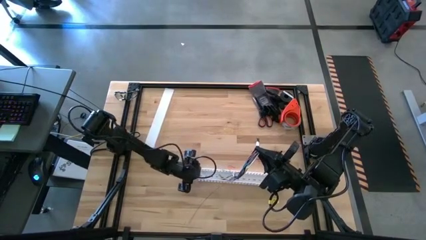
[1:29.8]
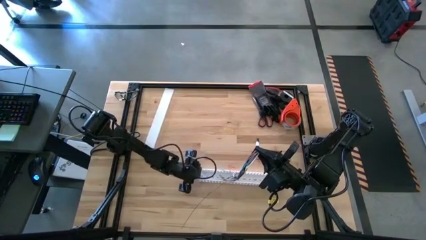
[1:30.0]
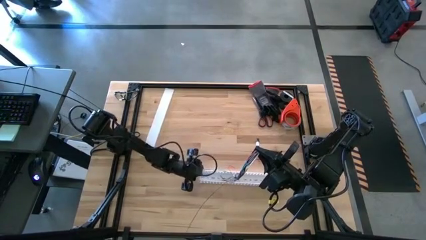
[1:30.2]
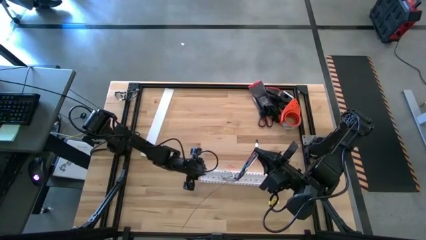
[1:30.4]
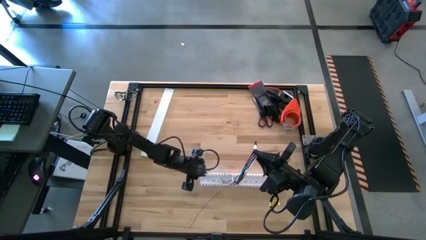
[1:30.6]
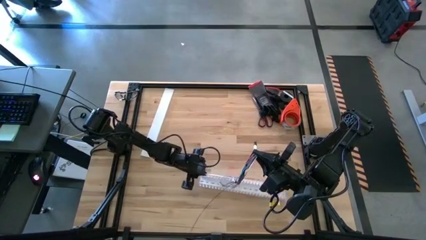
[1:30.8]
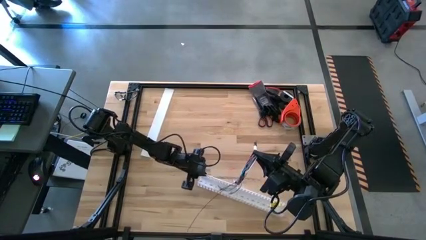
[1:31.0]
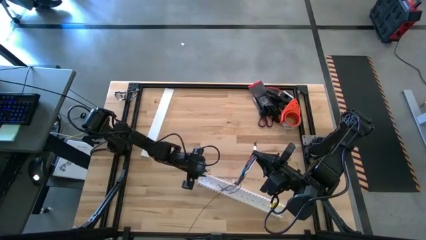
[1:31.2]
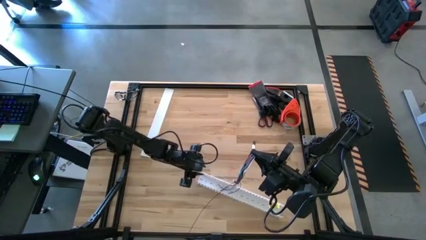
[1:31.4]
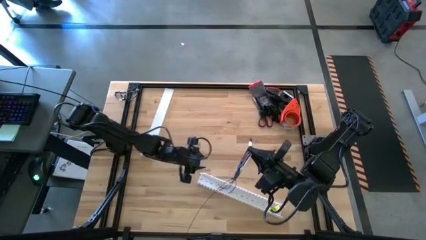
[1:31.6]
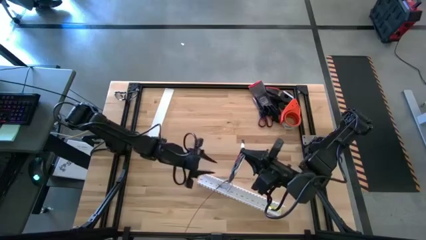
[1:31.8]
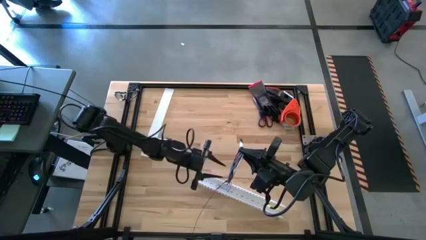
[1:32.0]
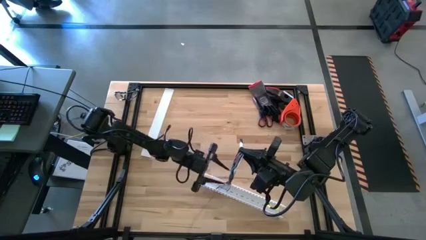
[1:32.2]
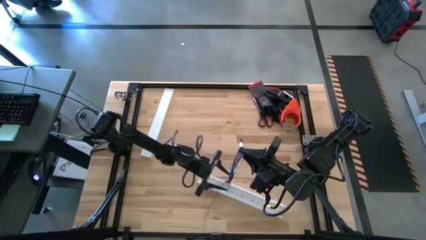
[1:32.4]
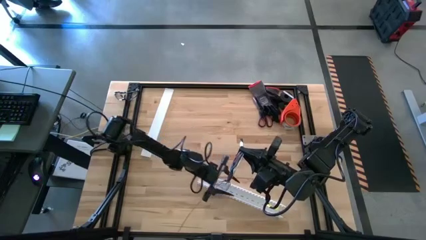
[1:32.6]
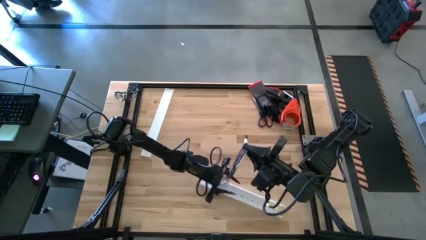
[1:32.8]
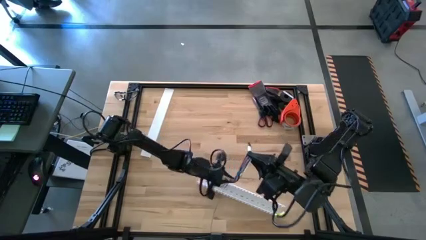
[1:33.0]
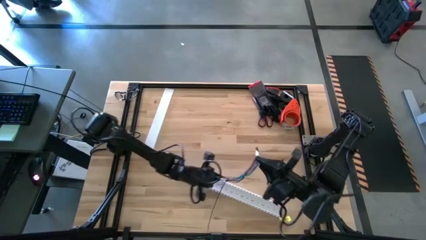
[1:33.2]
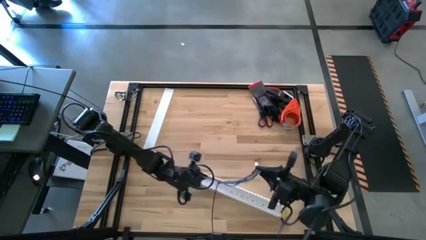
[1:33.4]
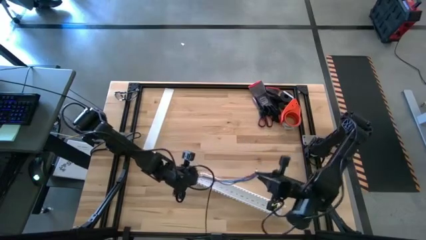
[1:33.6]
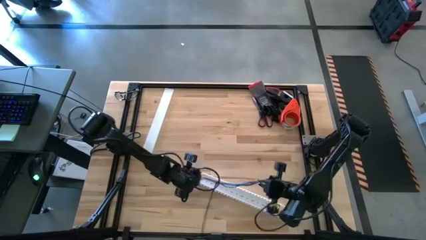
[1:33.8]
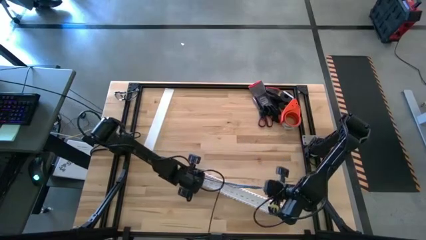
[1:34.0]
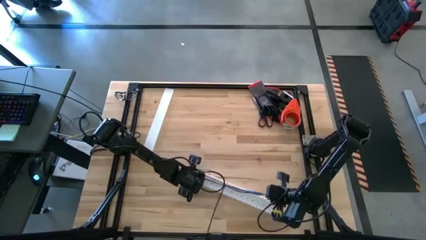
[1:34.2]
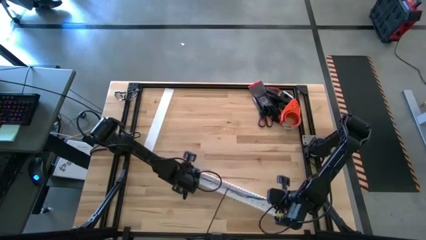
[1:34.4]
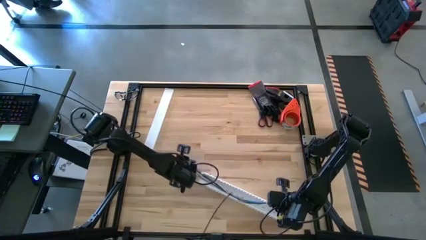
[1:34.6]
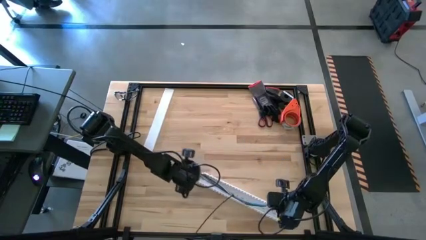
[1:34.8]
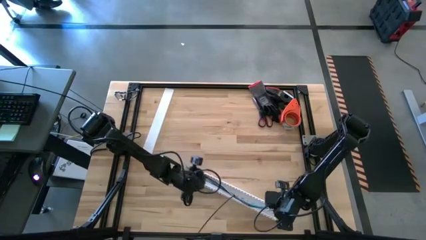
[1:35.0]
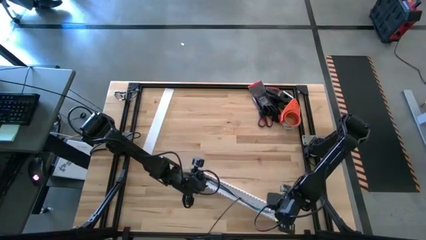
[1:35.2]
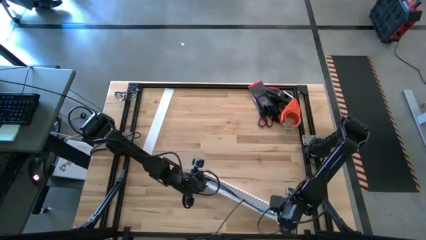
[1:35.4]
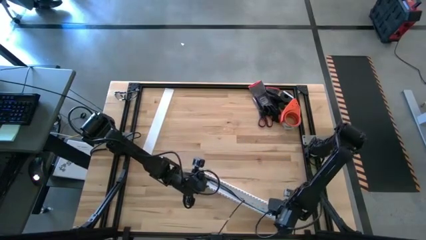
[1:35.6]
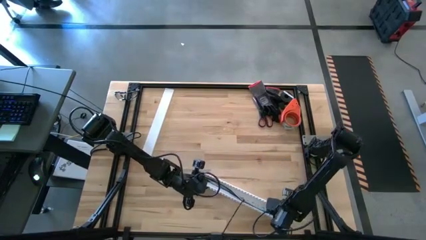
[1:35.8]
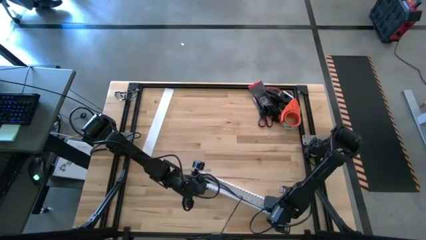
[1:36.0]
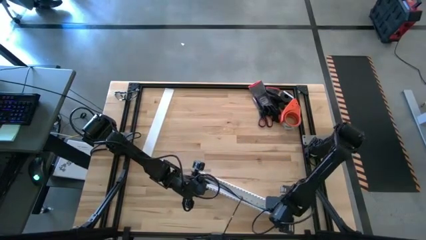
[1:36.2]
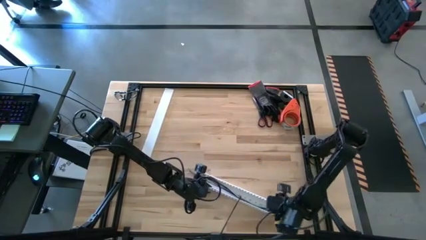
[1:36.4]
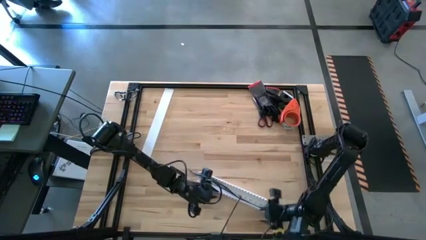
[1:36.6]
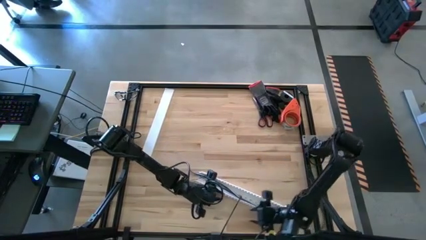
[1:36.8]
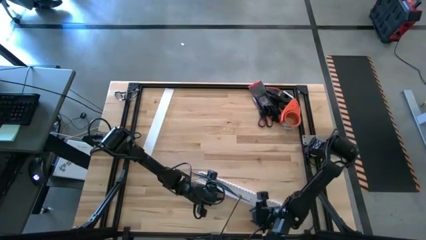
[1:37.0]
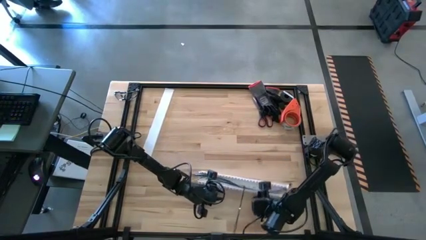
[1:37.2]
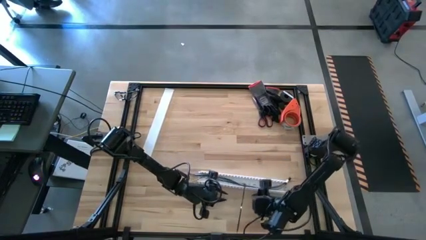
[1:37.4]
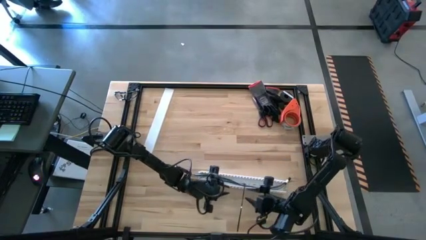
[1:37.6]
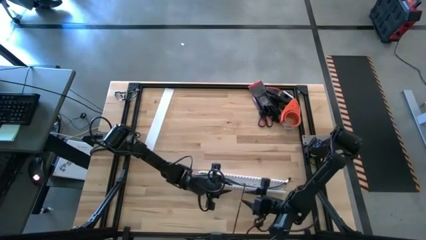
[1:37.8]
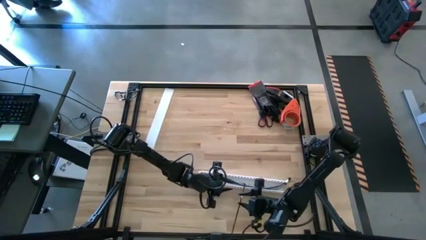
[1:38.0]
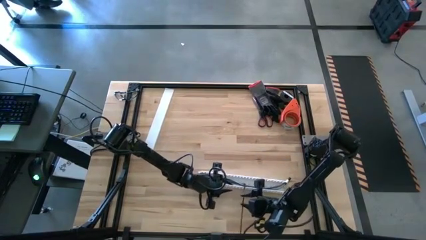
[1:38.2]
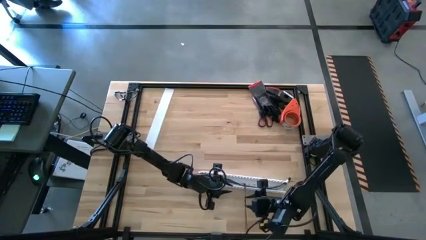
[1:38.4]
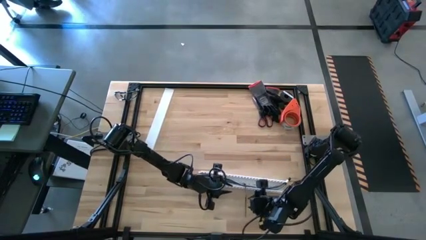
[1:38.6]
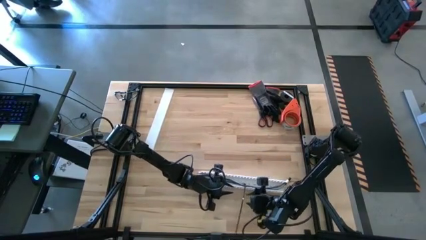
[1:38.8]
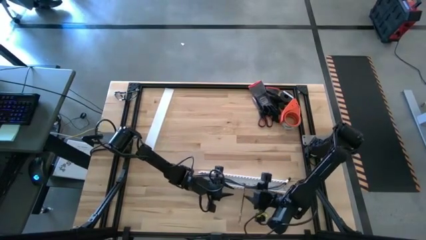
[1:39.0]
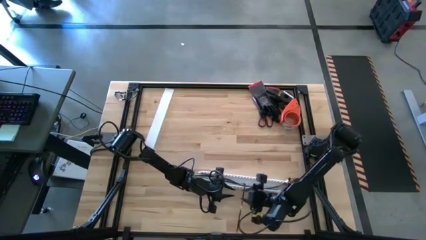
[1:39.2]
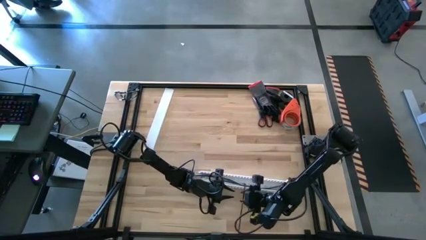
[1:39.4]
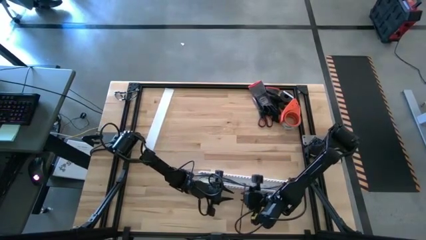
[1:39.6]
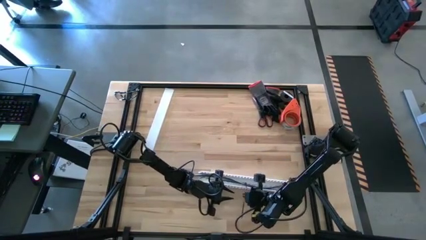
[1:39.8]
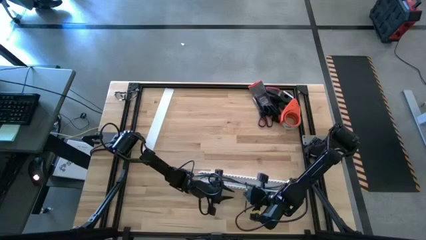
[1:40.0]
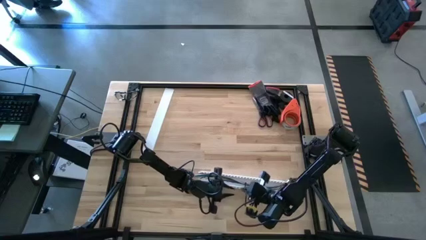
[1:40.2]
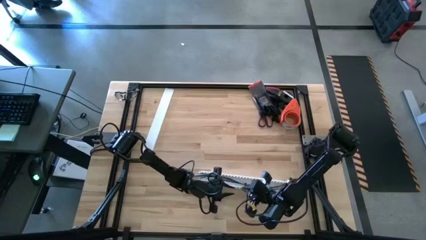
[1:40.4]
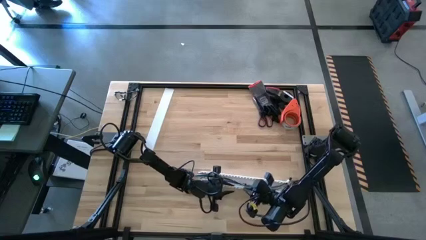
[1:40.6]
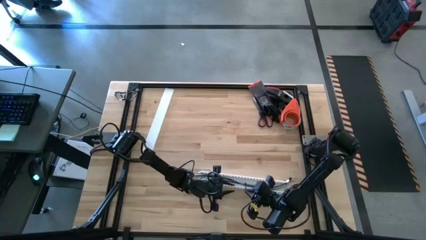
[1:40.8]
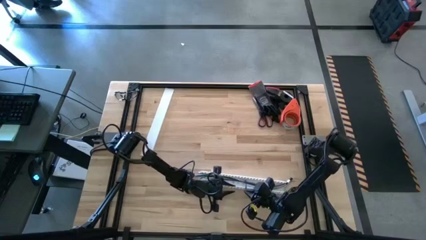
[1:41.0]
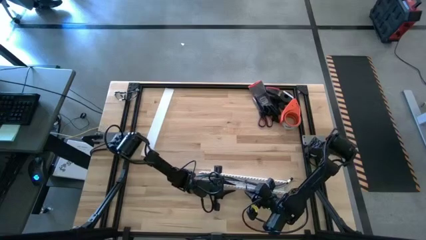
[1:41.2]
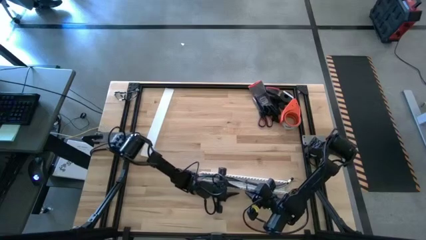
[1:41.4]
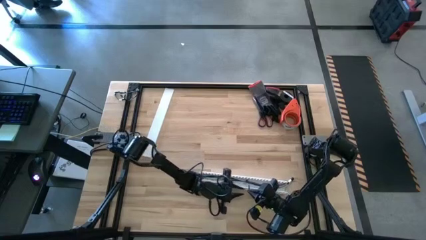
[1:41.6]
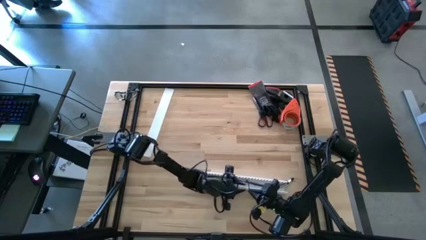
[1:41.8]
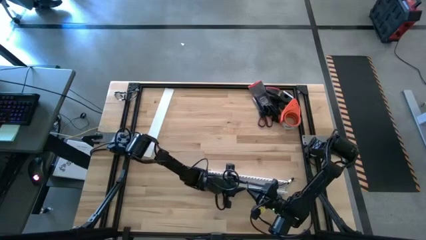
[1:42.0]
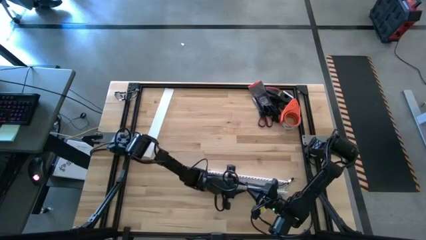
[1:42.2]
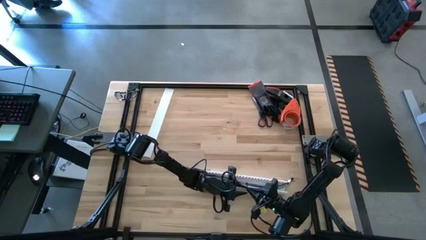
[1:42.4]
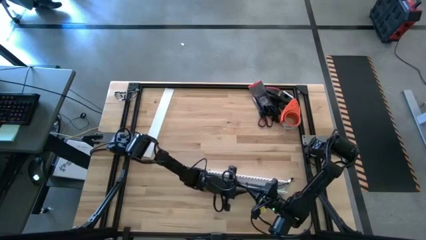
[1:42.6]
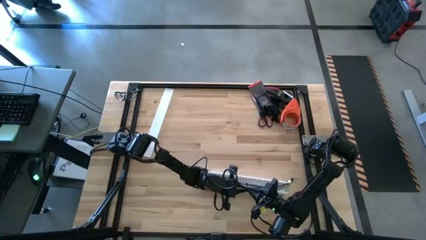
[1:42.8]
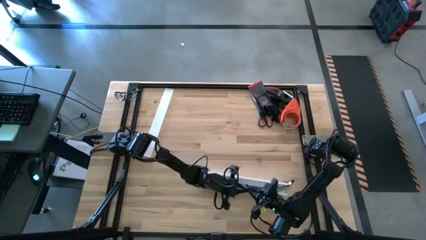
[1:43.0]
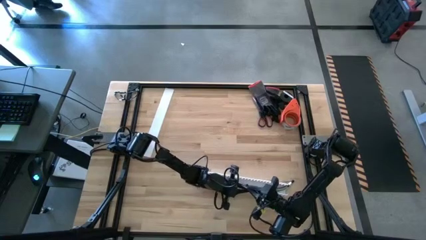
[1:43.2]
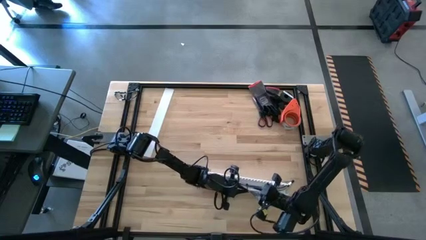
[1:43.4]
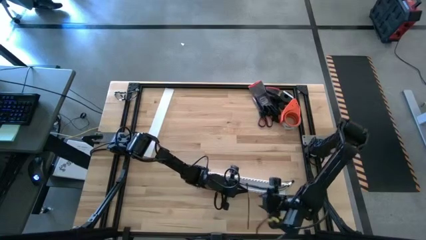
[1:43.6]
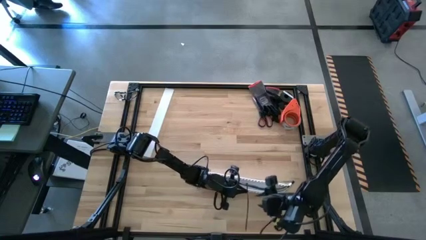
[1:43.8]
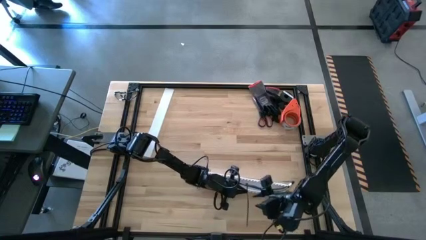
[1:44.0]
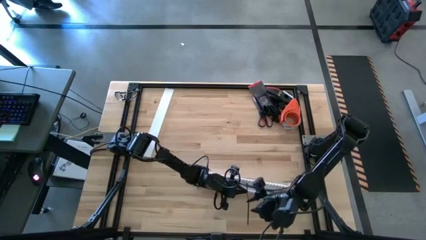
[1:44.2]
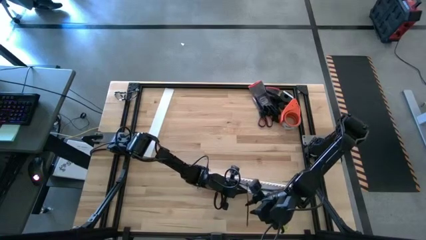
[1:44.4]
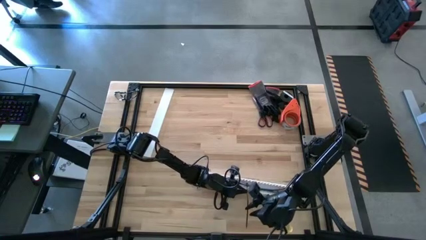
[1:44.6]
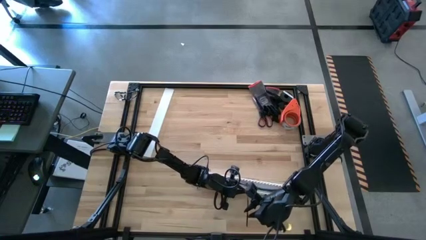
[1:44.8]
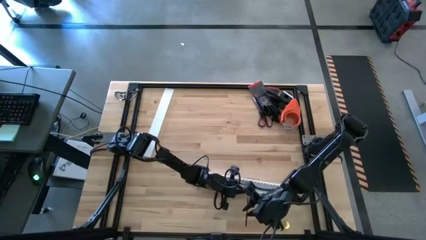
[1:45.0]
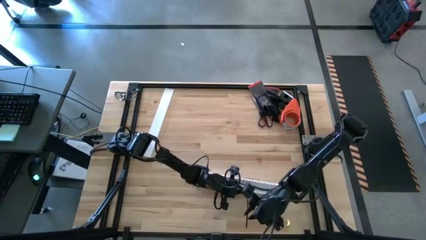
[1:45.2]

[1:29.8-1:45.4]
Task: Ziptie cables
Put the colored ziptied cable into the white cable duct
